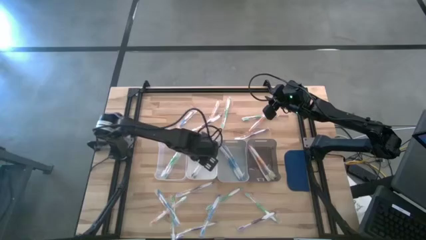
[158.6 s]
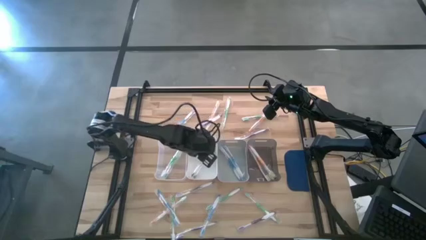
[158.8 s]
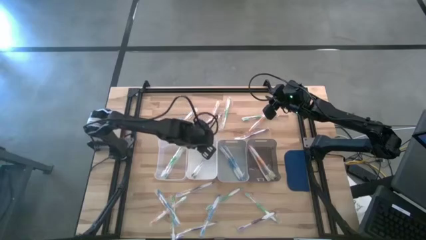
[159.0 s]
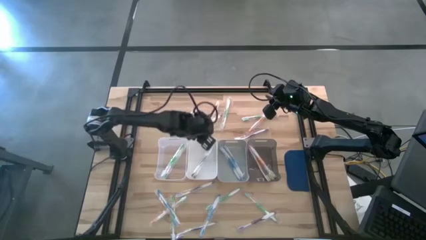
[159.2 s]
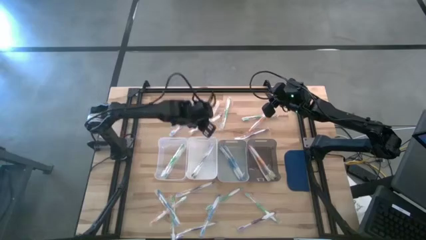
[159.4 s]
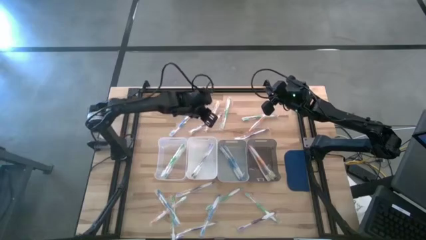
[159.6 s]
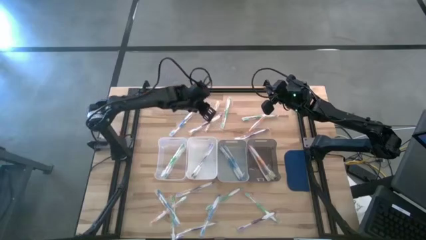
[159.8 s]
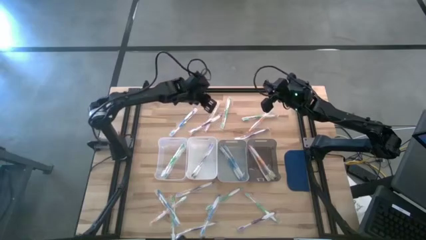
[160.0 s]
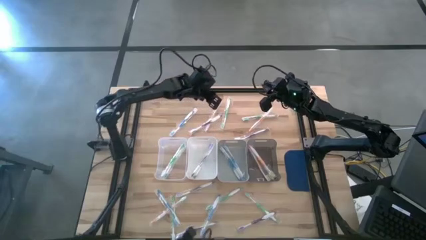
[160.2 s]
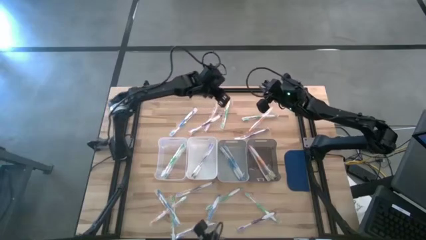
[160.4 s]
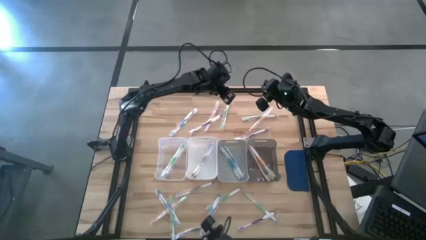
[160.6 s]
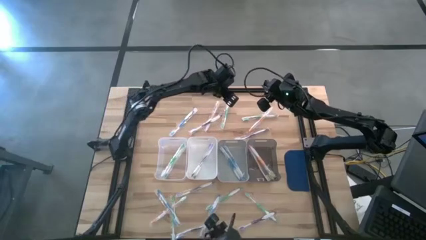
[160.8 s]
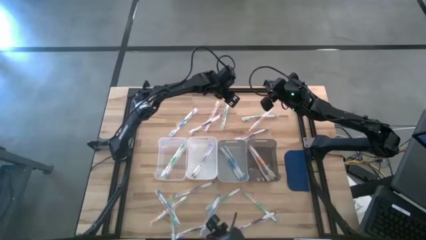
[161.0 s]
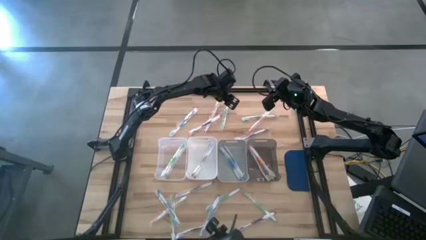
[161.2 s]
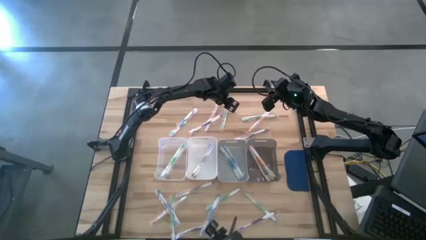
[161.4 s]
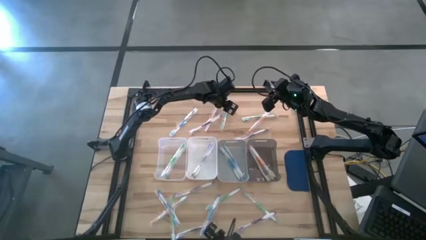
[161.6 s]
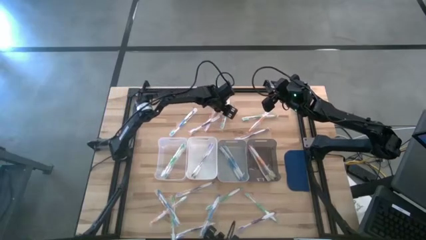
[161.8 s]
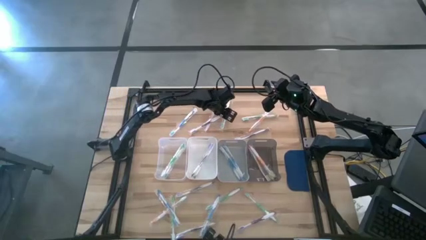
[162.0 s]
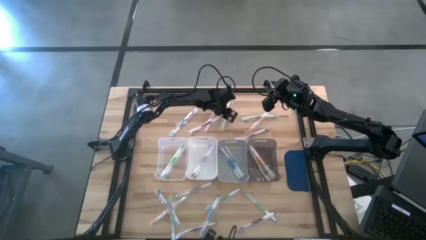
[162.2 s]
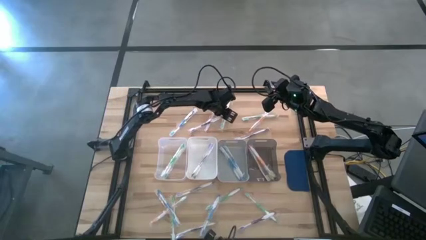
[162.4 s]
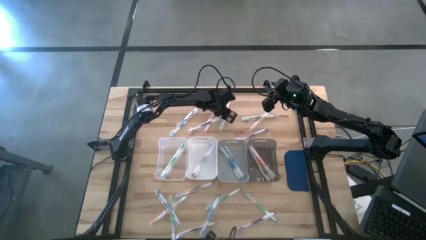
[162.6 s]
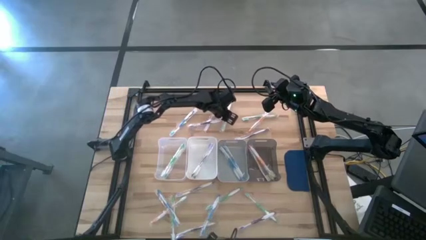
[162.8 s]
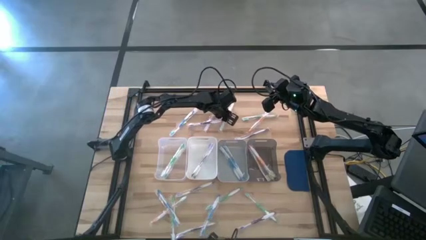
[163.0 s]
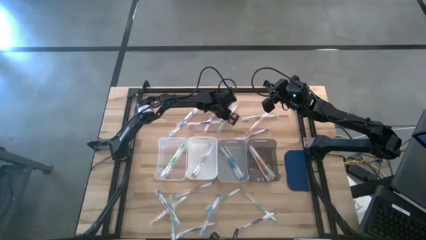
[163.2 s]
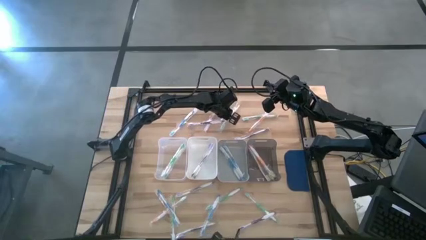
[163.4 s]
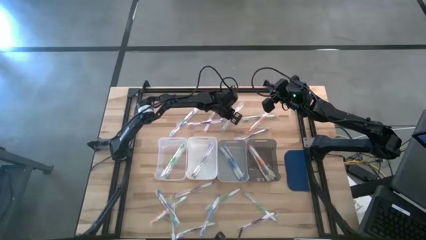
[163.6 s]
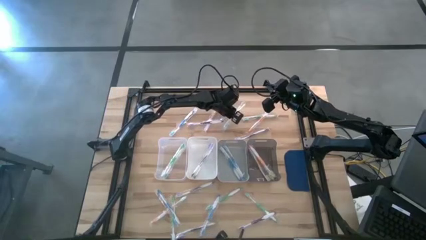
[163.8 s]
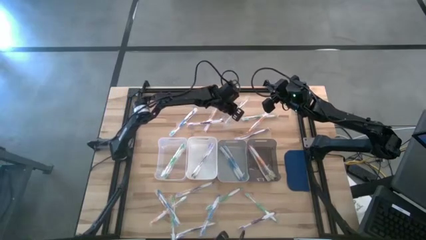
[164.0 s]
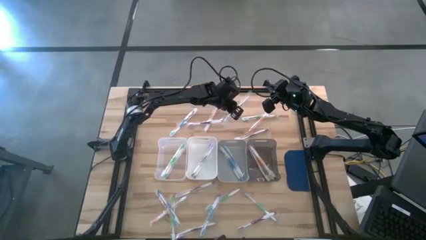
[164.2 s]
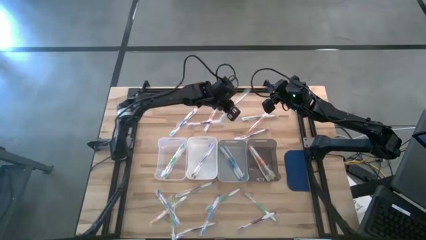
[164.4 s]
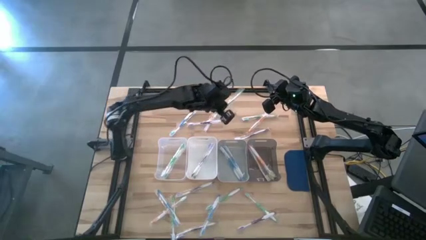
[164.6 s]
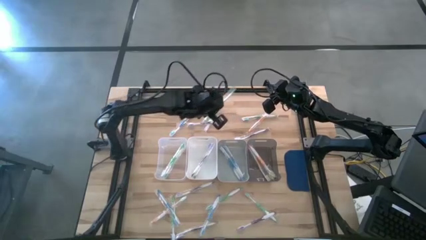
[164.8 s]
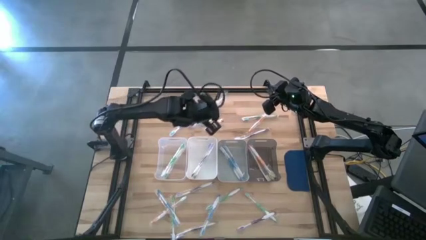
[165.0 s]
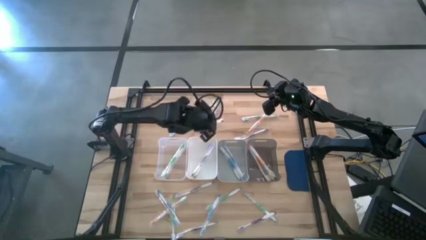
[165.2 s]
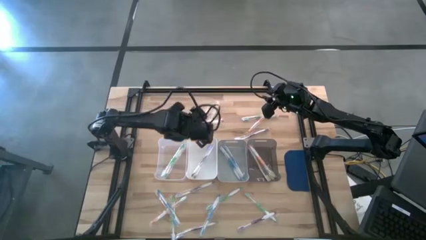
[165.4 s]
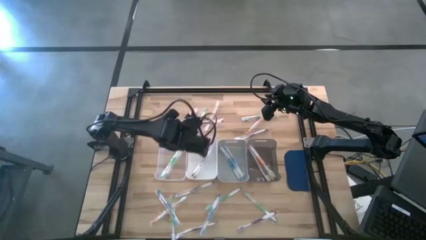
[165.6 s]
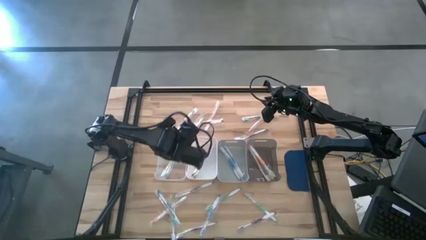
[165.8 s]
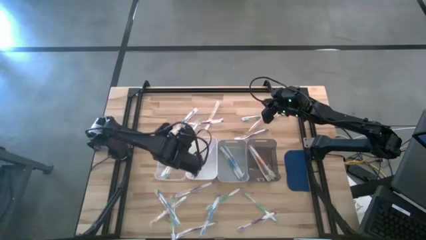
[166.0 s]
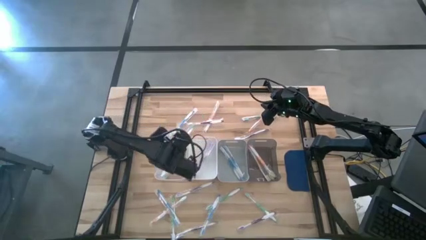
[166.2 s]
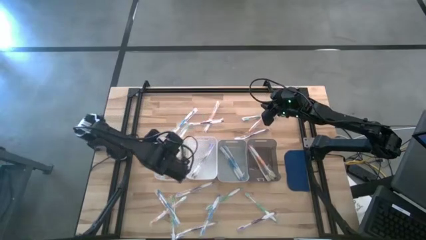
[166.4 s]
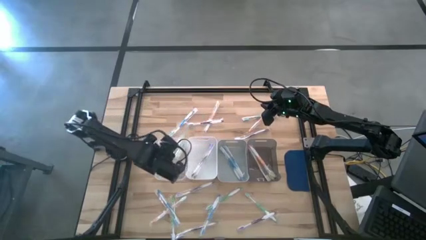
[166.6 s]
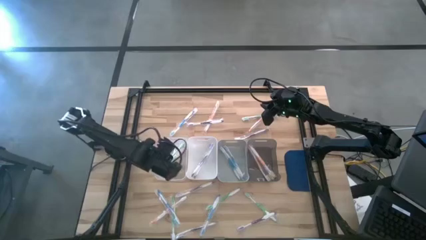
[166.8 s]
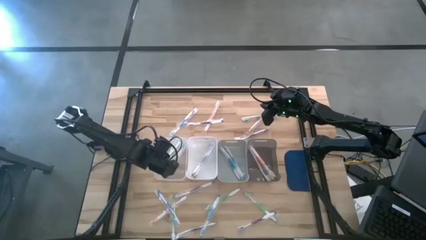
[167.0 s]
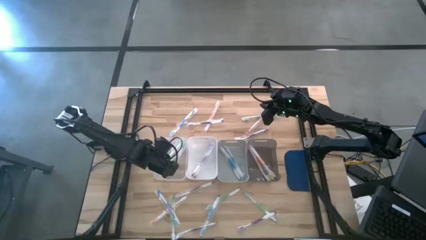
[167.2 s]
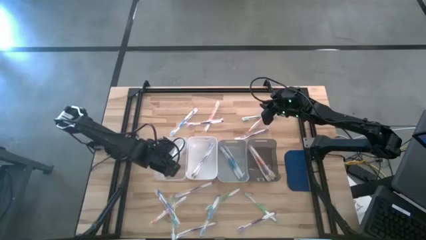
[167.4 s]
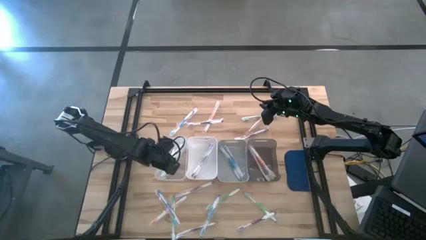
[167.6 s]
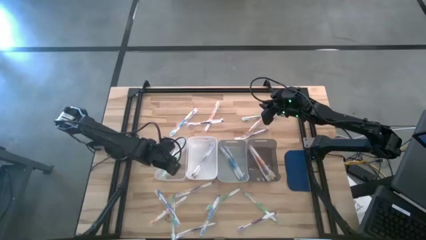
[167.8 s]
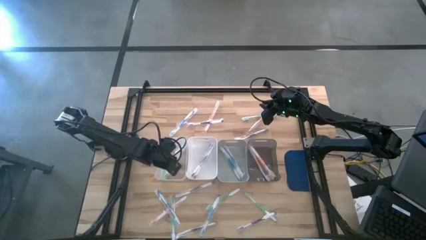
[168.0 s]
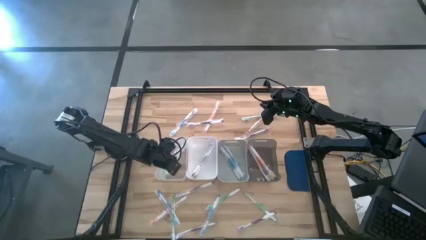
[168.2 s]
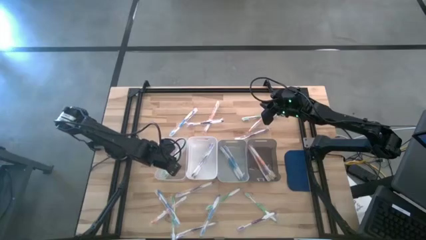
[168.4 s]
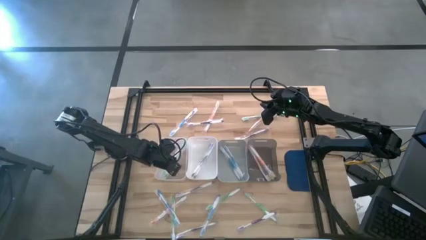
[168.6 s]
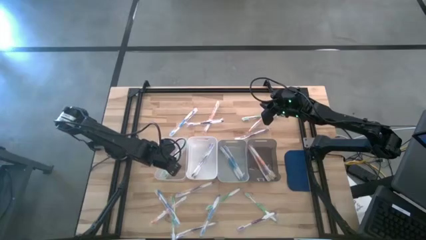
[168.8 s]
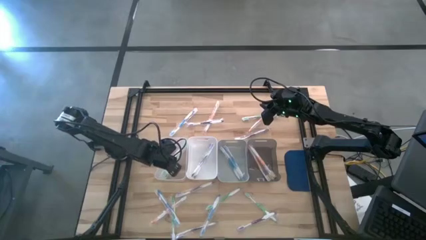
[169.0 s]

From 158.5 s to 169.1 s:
Task: Pick & Place Toothbrushes
Put the green toothbrush into the transparent bin
